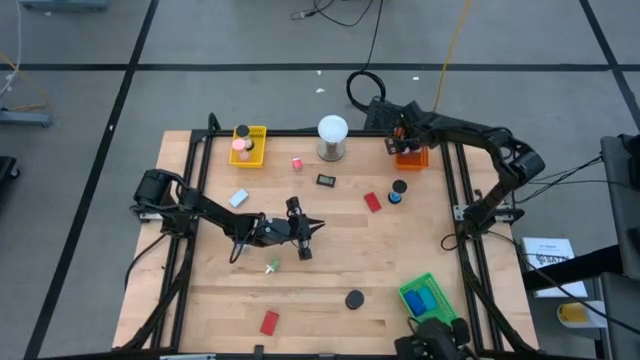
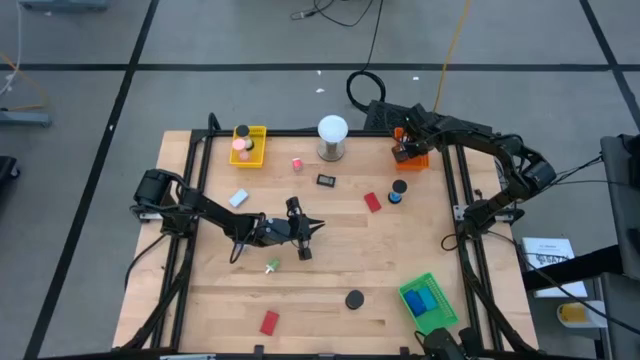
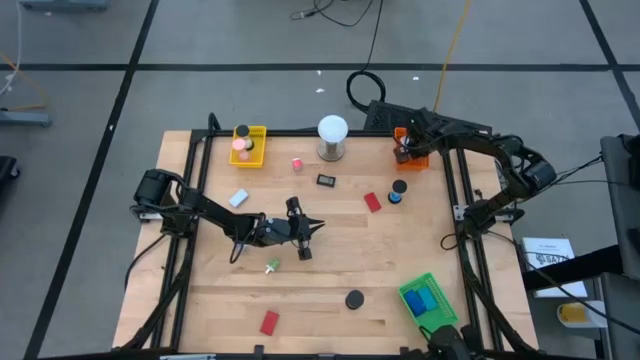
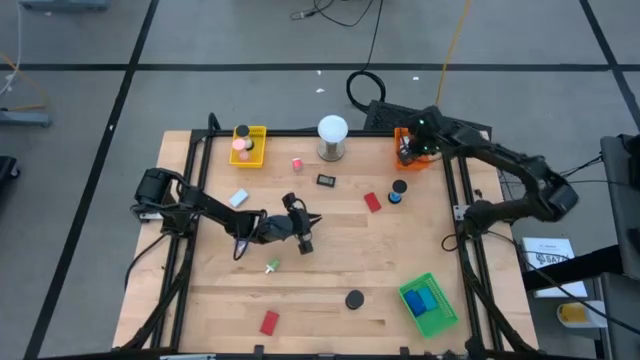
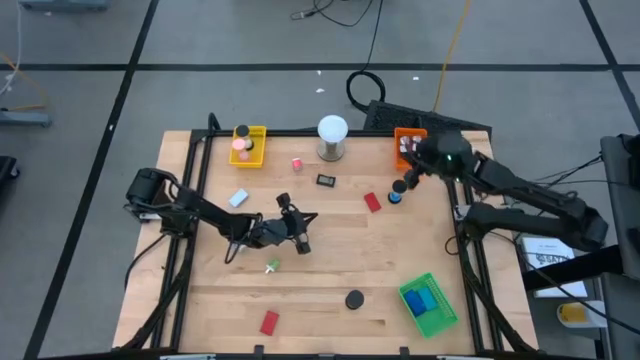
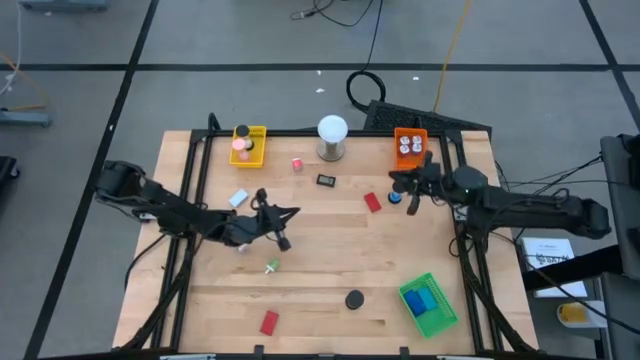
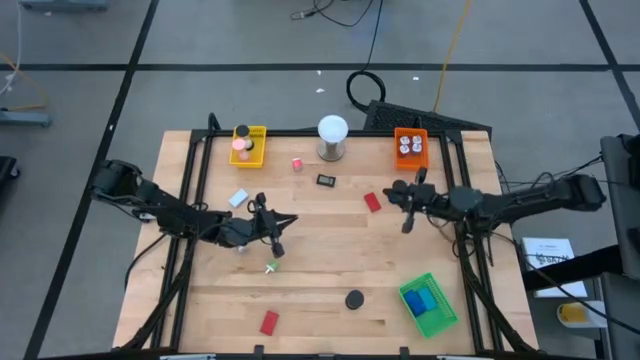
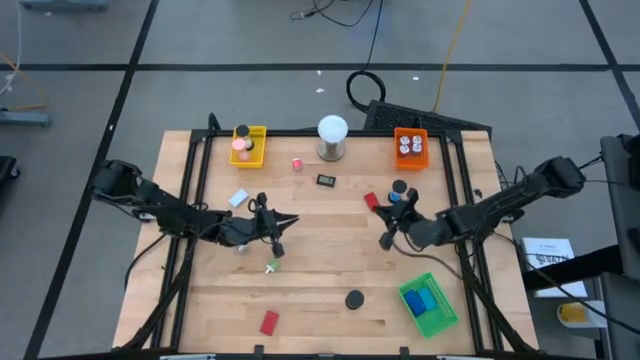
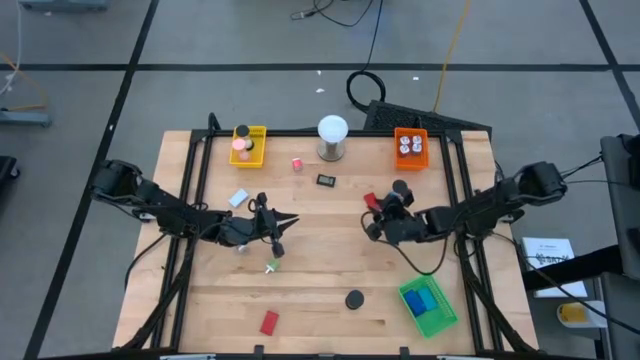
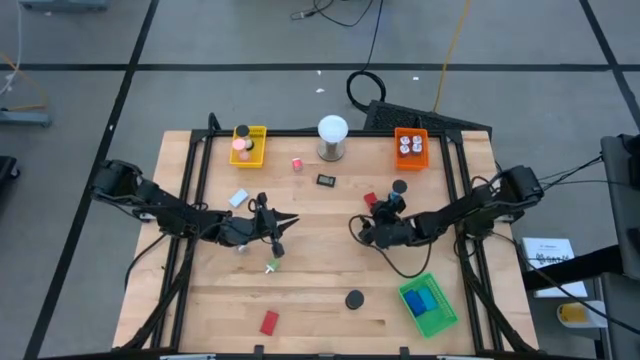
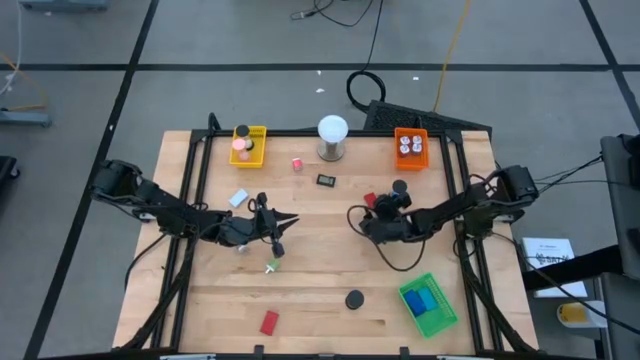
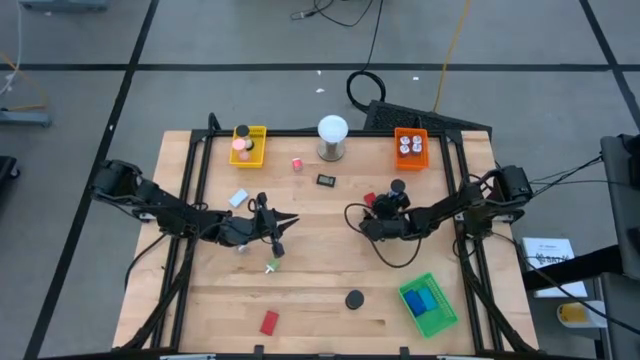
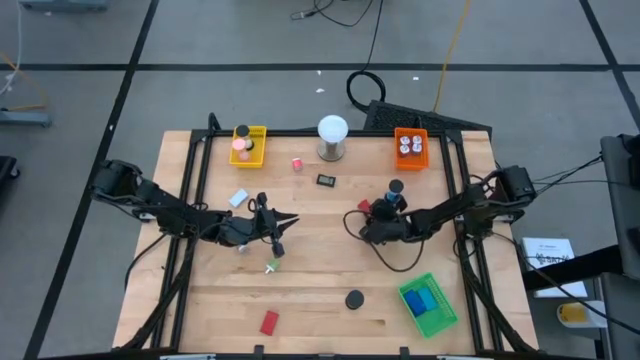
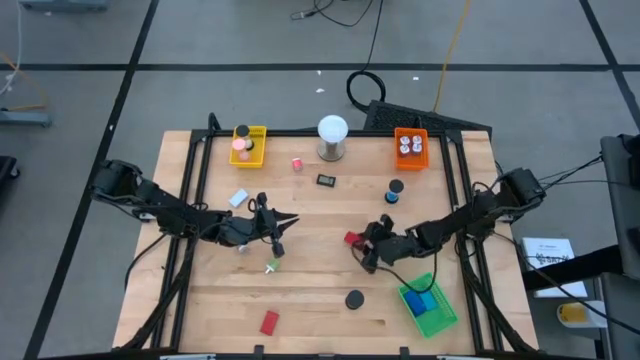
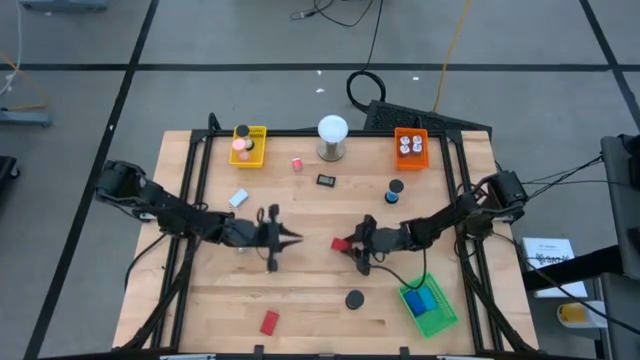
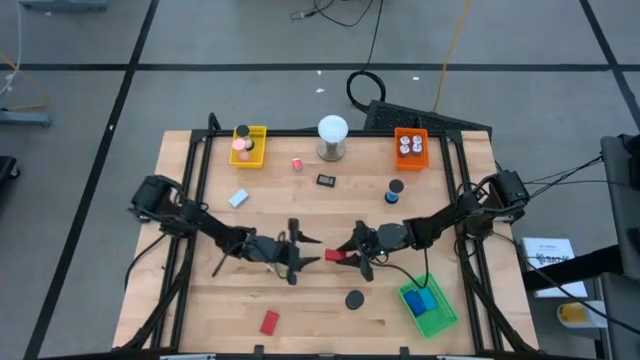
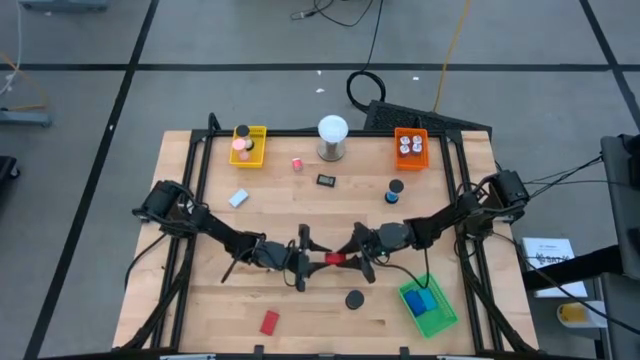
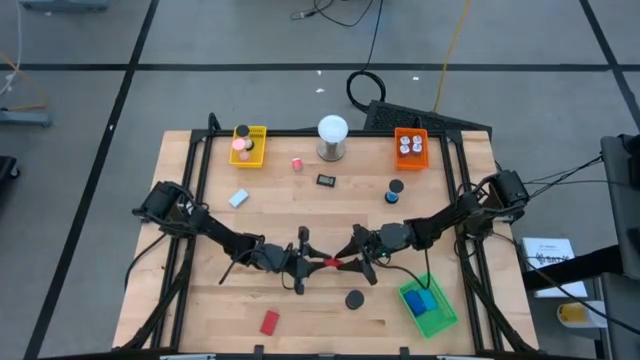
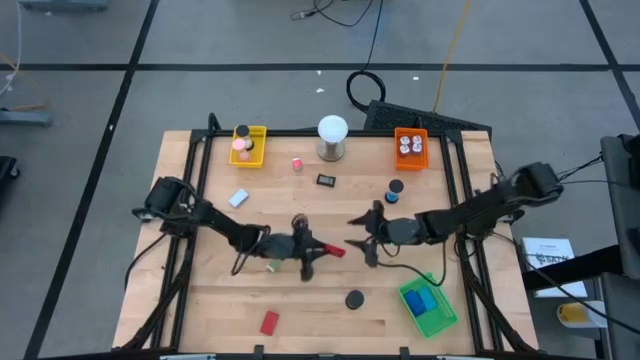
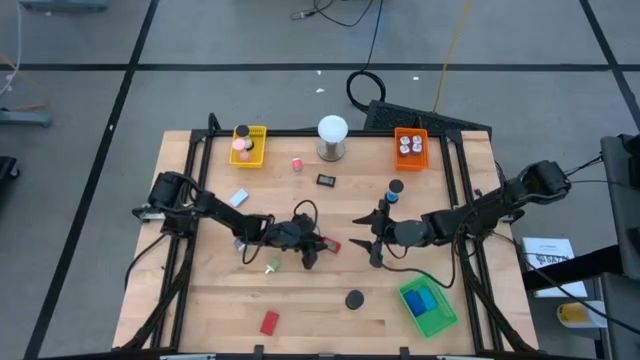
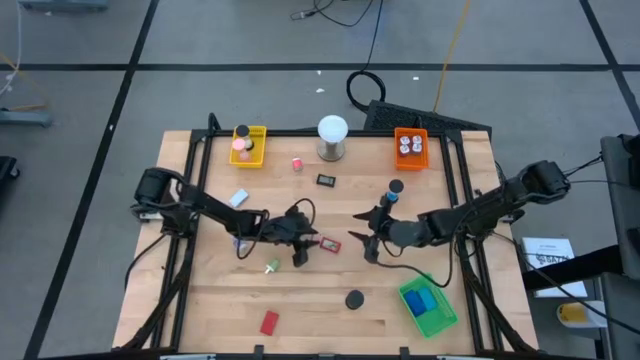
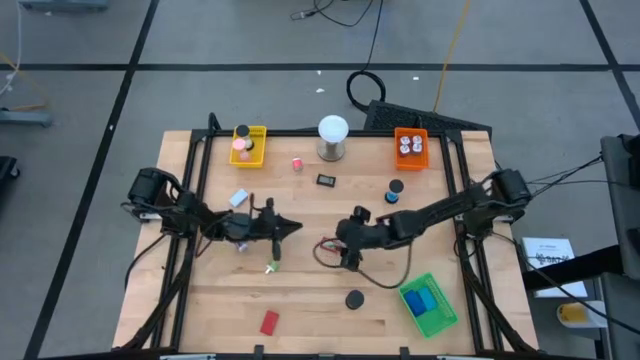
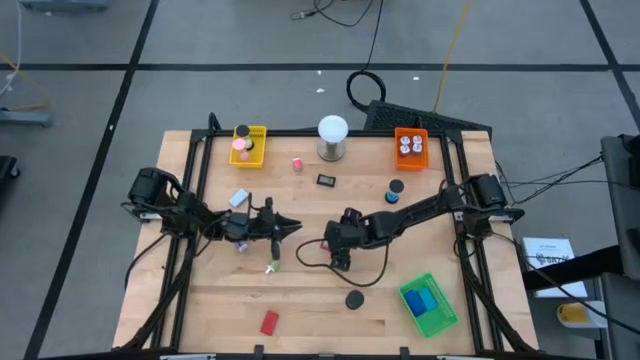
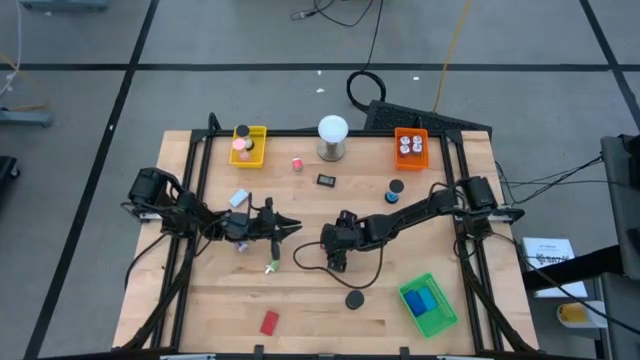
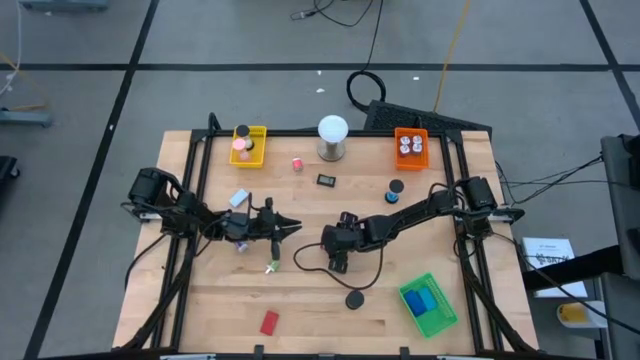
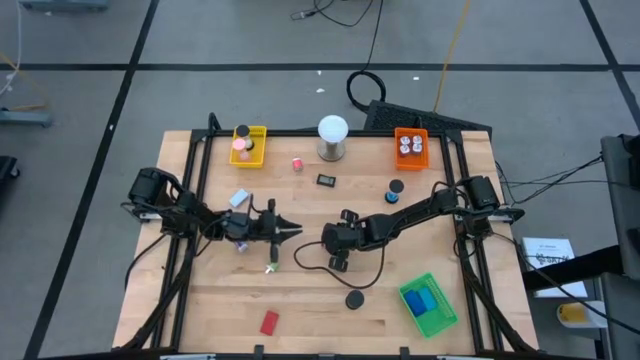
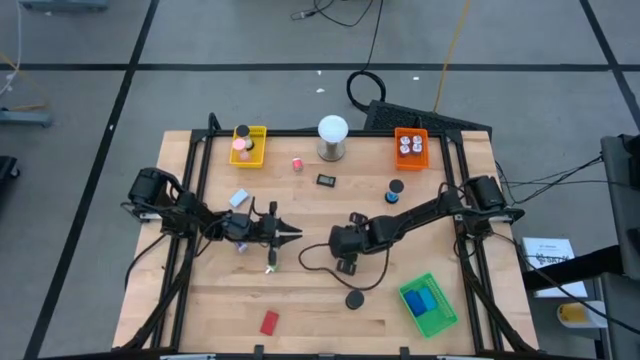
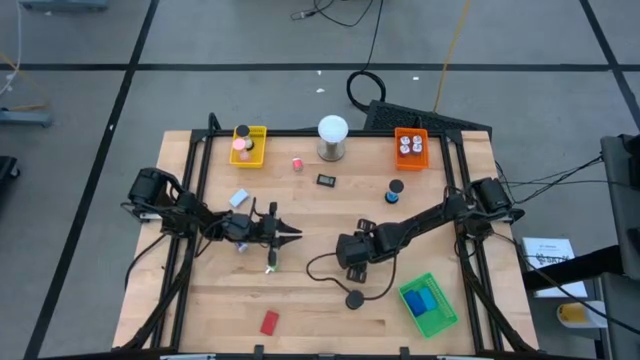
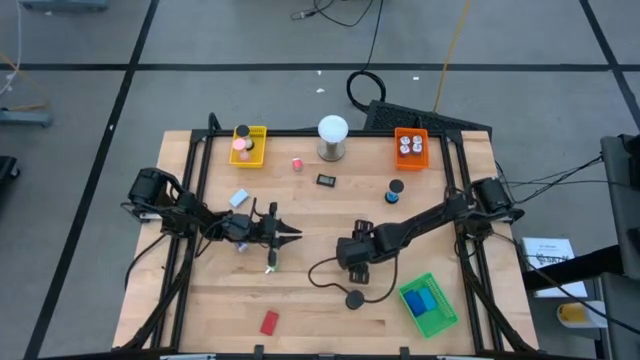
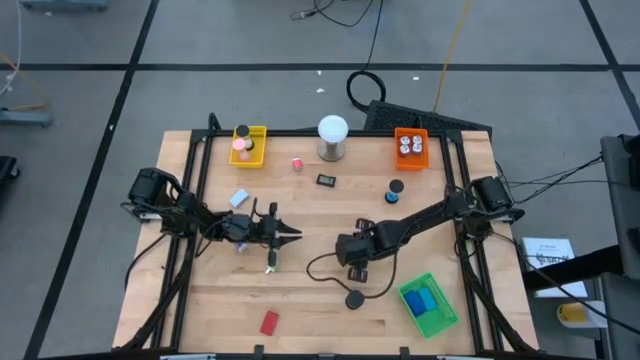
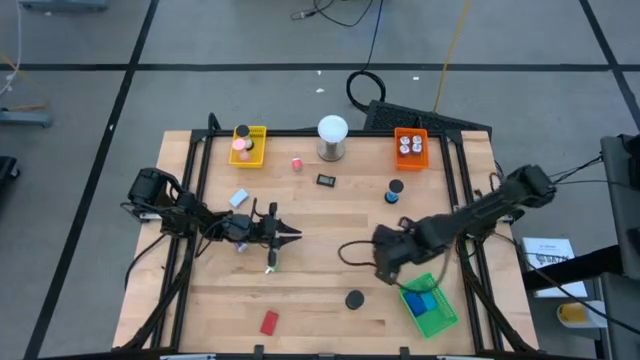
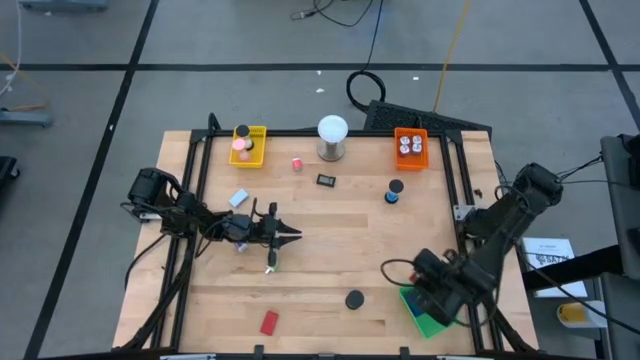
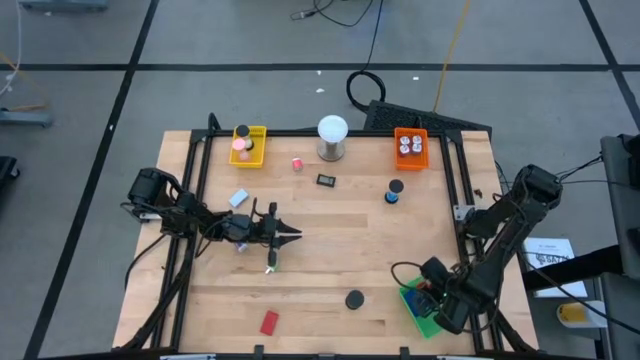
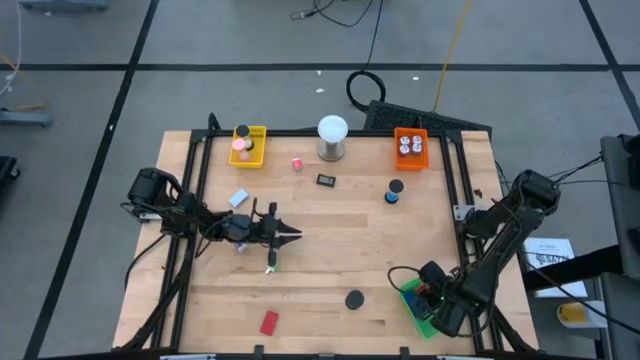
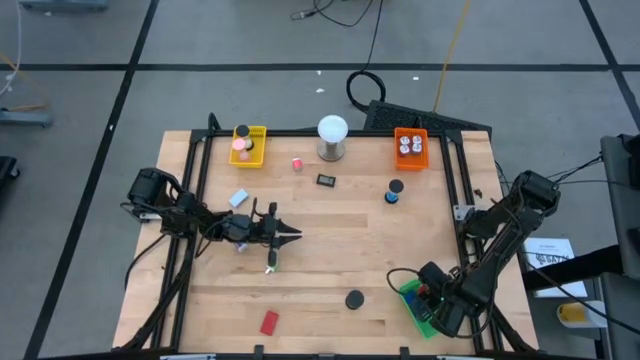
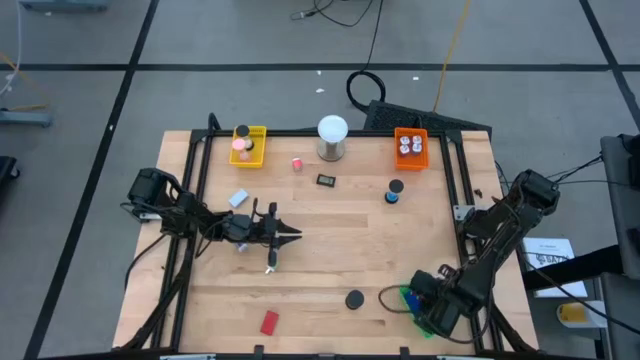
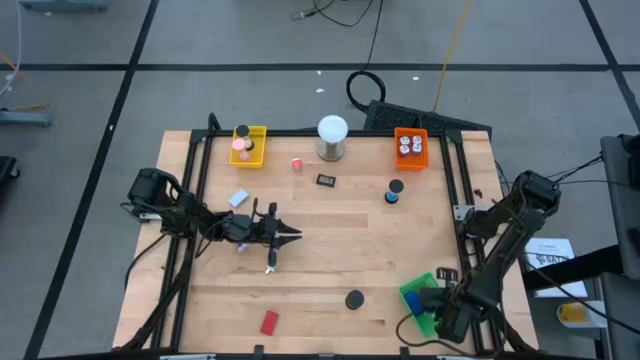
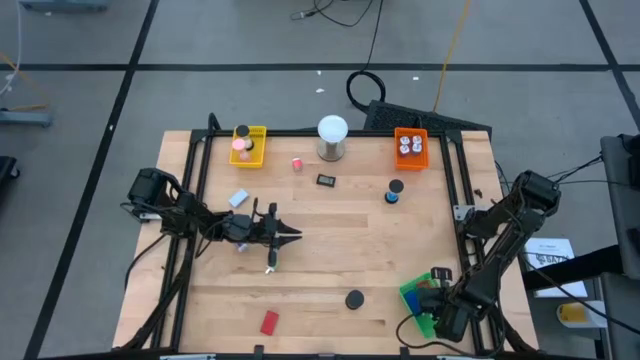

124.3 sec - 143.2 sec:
Task: Pick & Place Office items
Put the top red digital clock into the green bin
